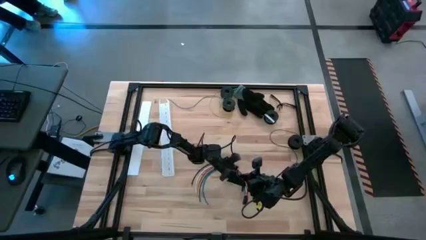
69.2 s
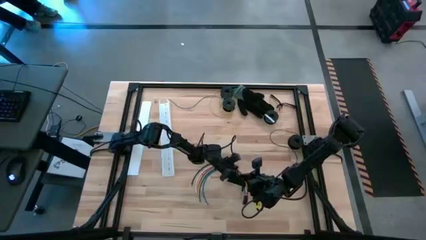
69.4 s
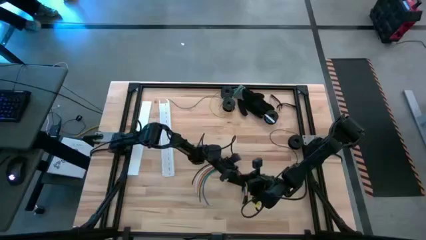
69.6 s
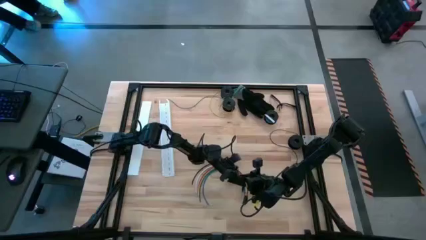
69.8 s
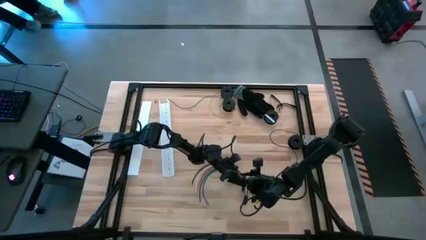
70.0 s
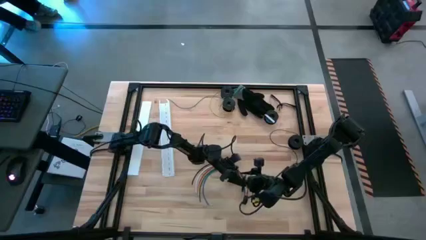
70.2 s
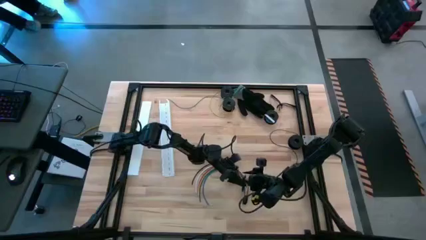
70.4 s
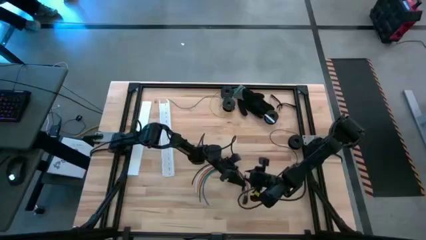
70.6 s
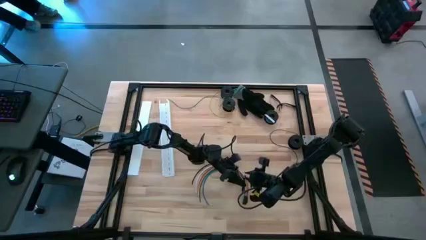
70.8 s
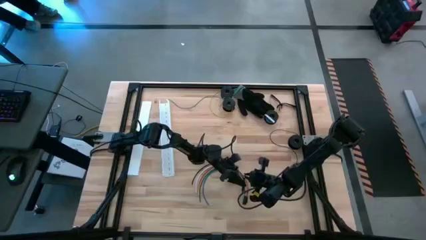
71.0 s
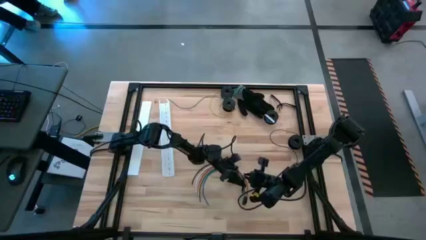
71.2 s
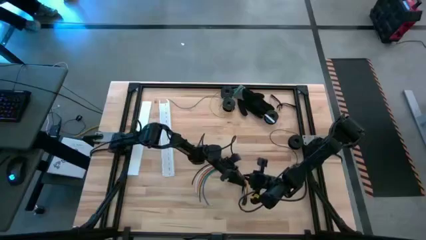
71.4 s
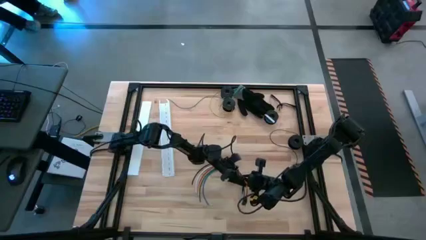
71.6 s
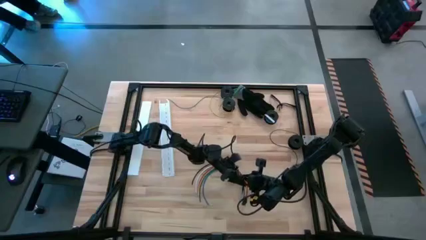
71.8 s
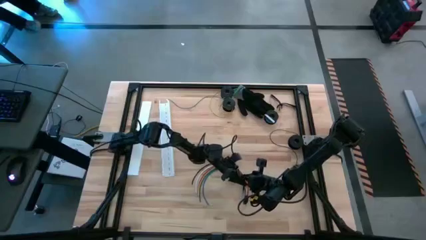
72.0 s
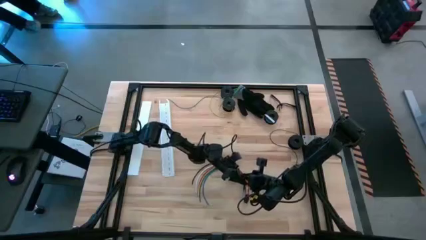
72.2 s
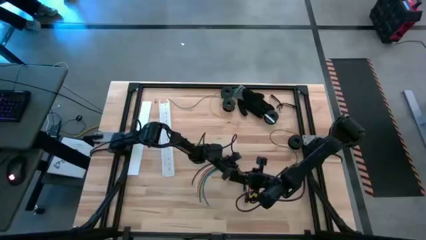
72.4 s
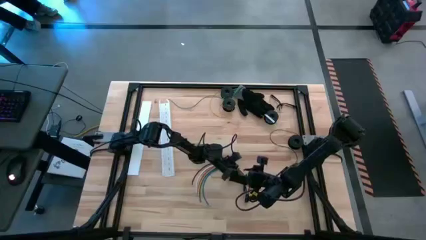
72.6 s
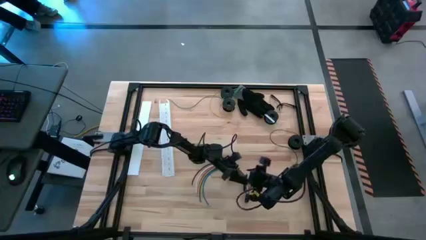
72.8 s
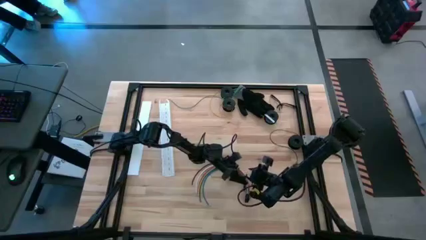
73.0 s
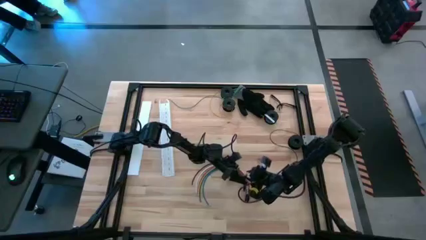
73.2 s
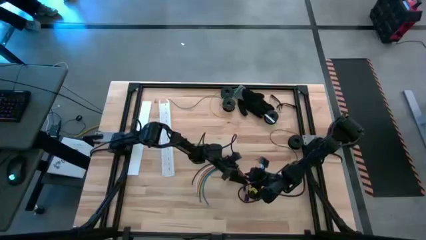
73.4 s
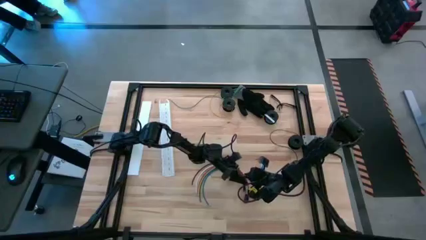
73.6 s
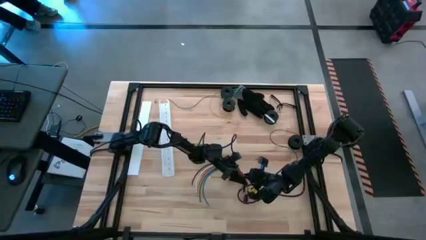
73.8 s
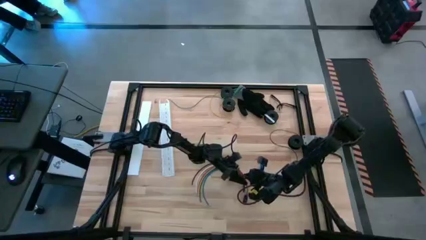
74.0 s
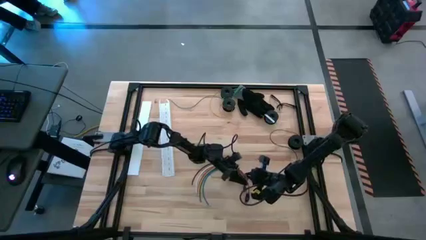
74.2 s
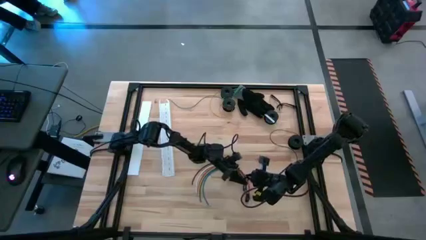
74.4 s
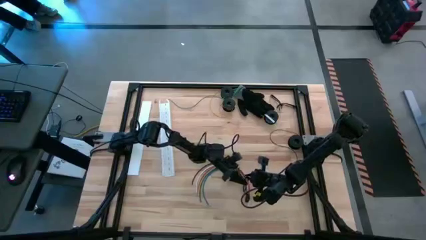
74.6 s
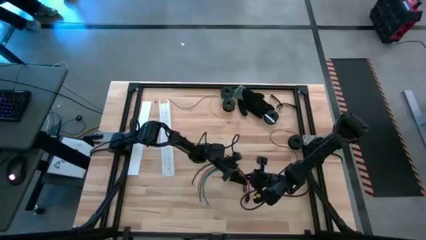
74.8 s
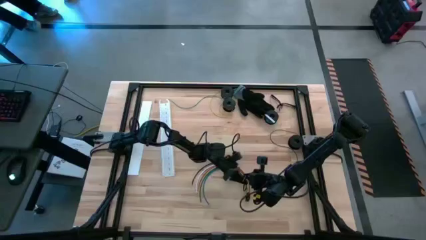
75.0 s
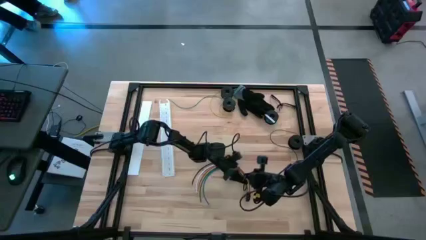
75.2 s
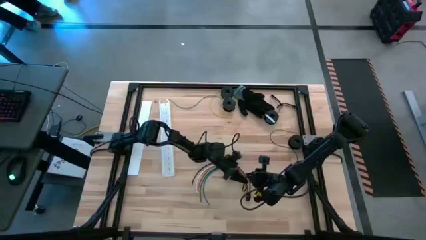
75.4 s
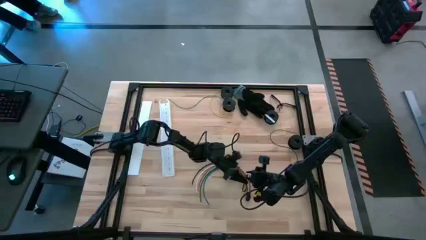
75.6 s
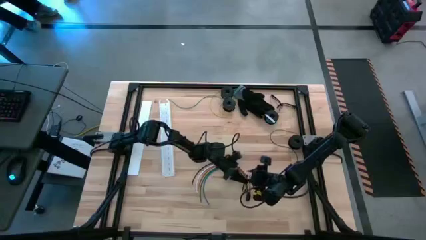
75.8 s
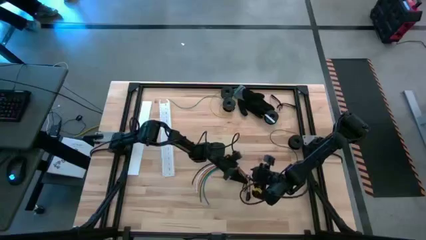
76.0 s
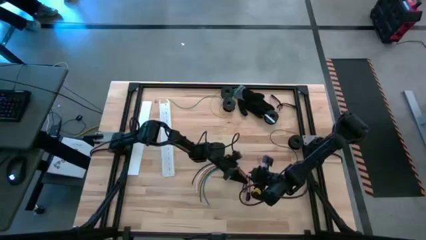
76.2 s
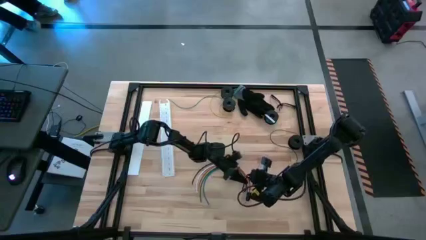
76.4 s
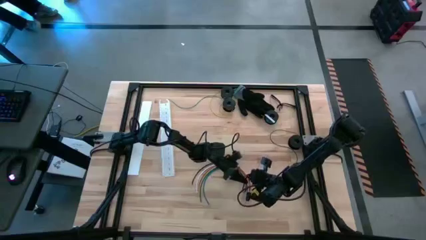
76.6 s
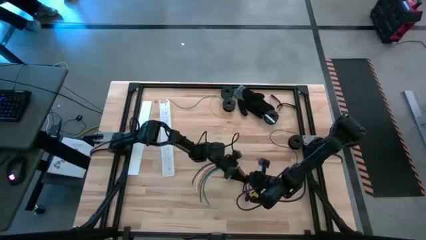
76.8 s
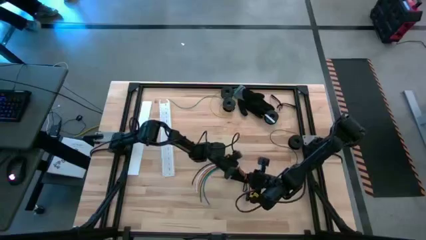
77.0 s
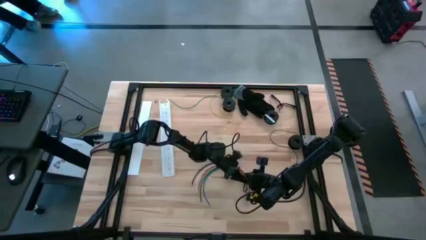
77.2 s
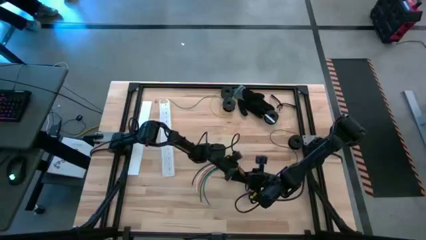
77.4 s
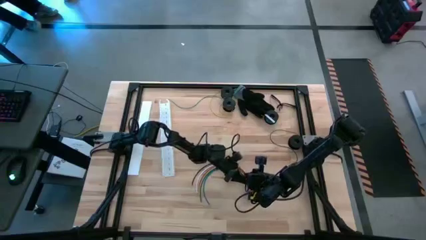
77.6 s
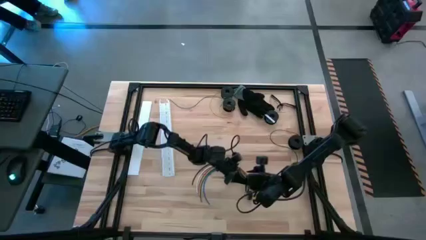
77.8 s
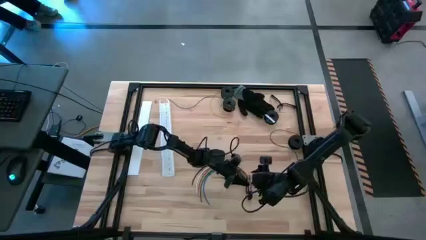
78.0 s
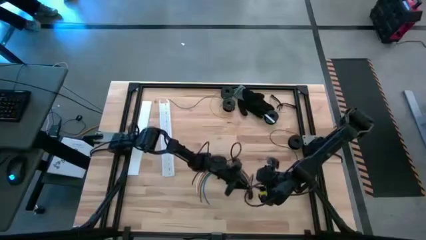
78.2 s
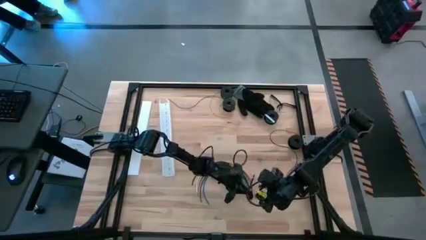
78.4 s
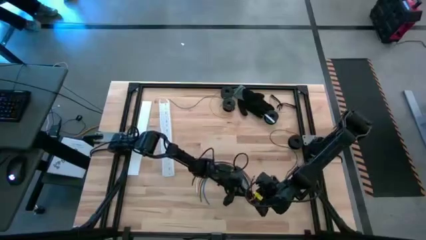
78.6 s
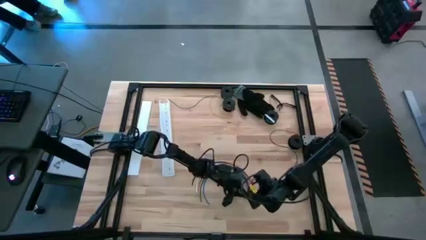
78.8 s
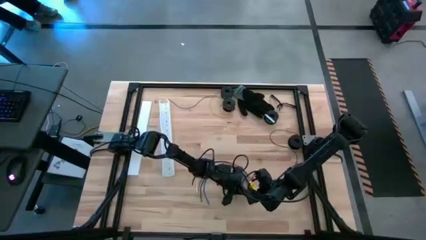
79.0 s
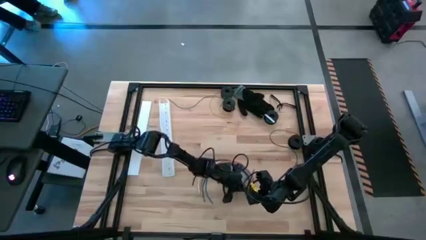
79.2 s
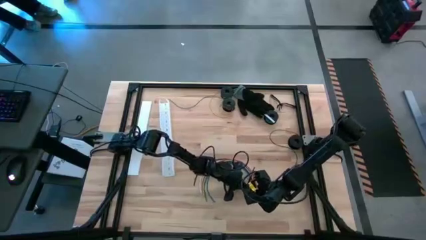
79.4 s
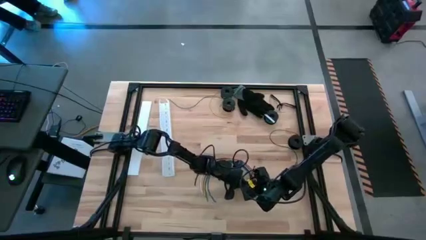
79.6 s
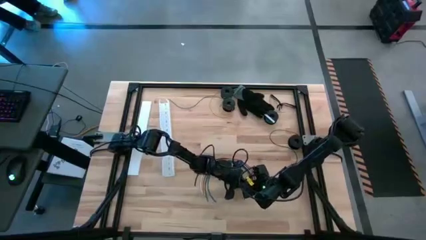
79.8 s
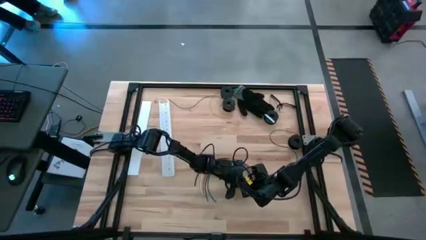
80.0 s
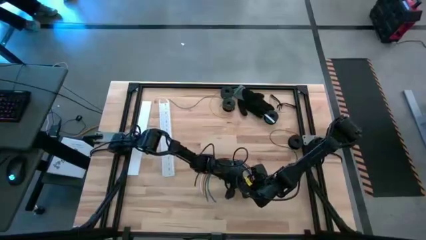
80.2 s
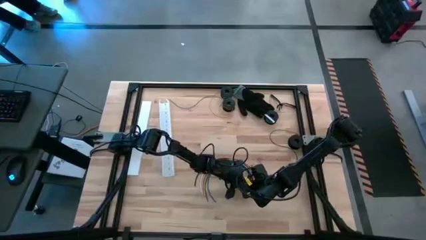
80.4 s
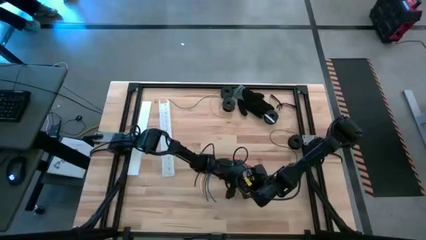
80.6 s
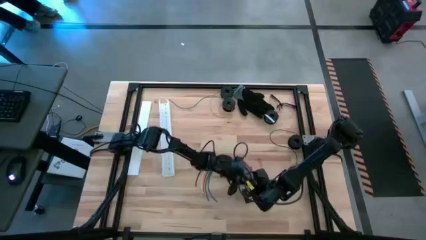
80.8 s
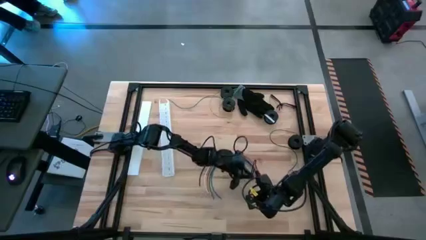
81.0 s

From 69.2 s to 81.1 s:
Task: Ziptie cables
Wrap the cables together using a black zip tie

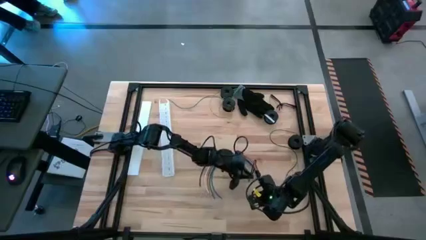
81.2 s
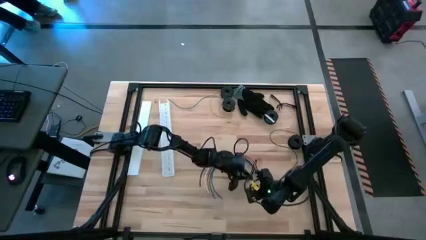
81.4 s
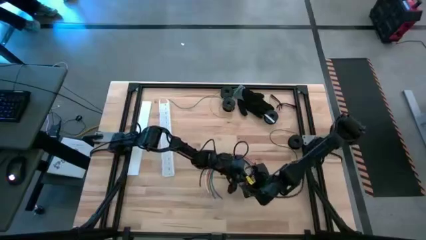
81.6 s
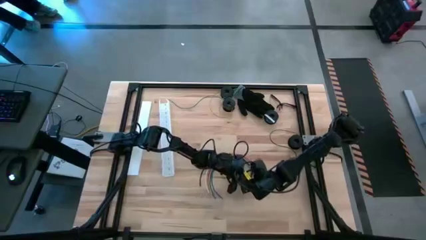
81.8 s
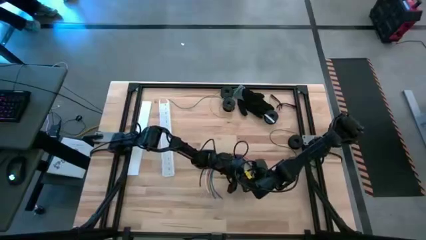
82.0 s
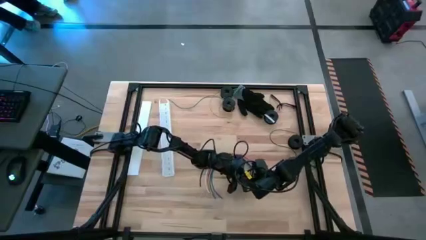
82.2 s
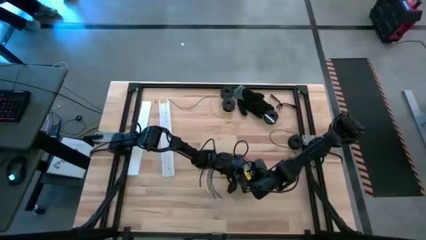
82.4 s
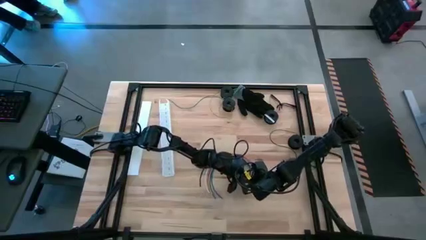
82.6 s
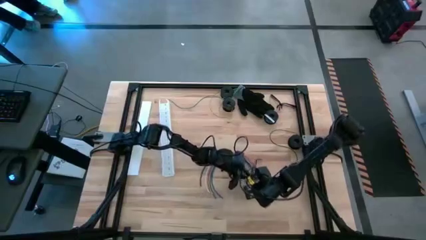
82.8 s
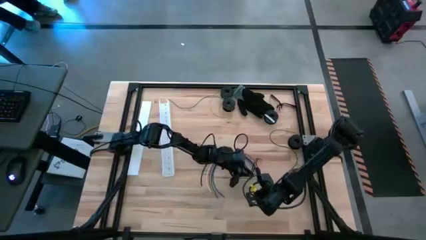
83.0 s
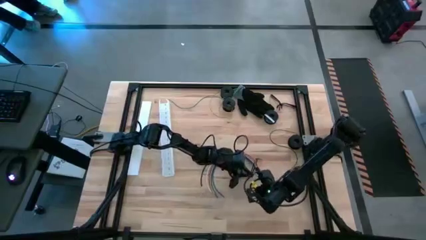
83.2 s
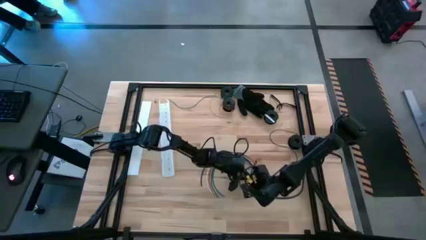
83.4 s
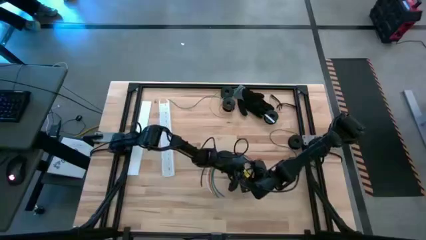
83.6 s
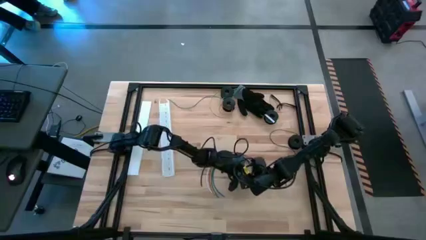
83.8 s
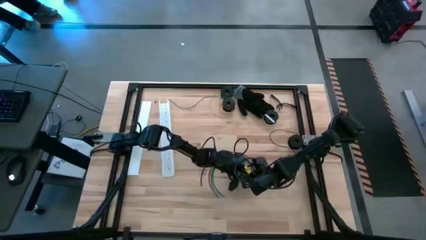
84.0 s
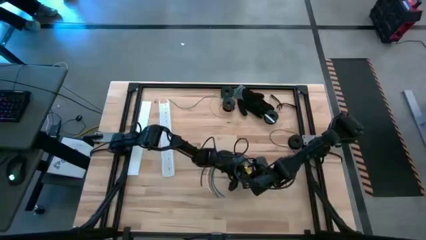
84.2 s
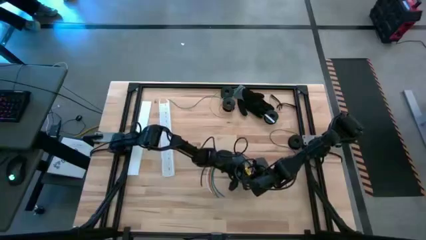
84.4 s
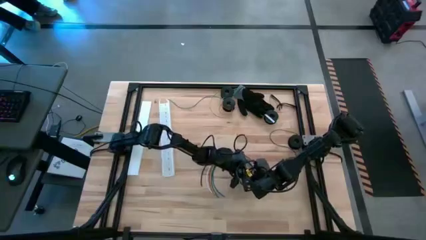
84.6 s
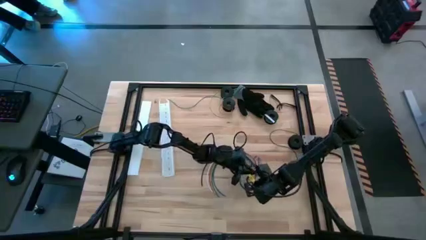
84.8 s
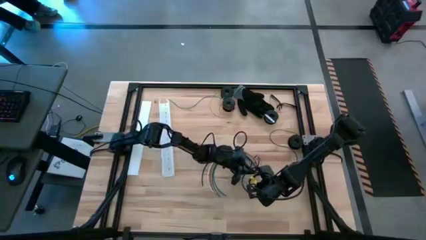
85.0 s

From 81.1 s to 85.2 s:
Wrap the cables together using a black zip tie
